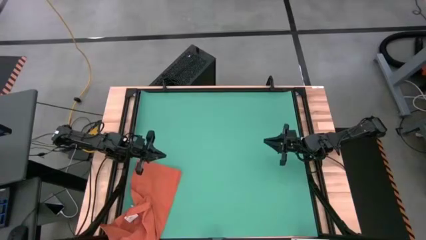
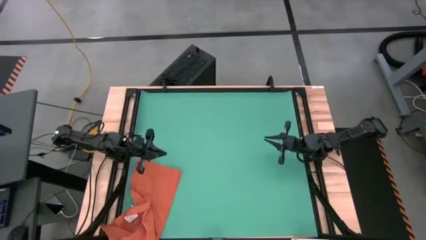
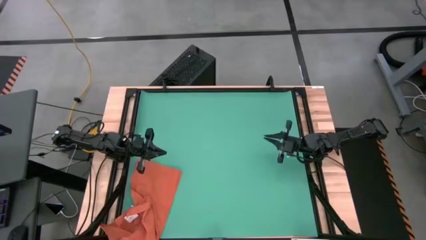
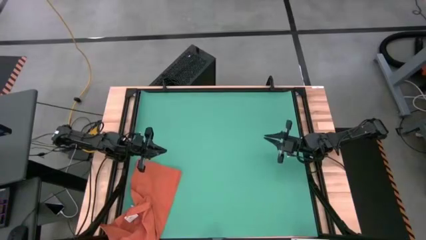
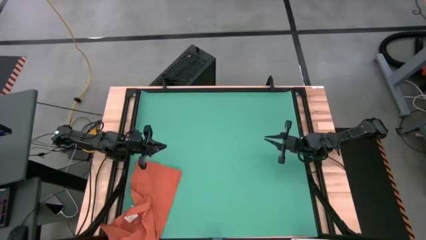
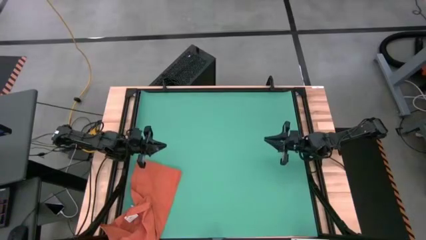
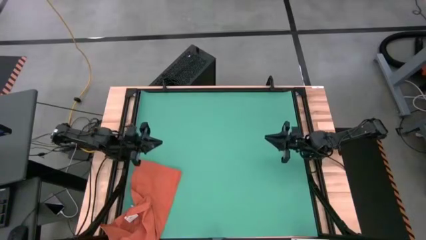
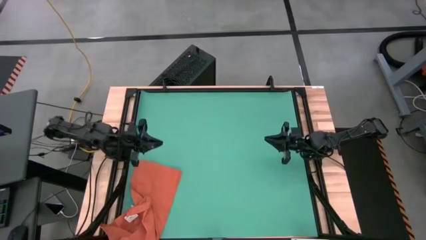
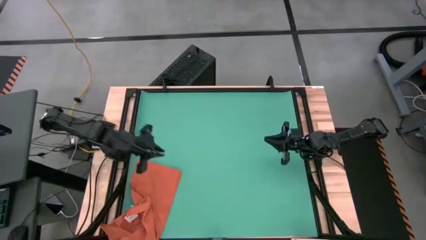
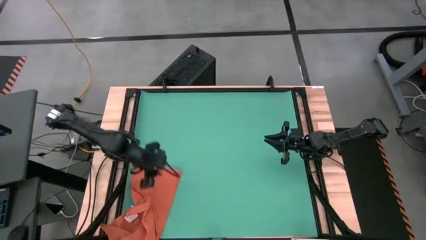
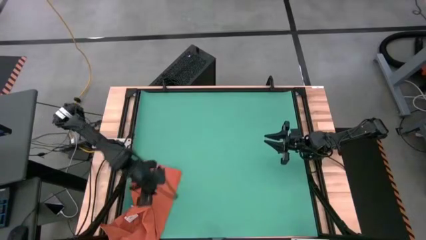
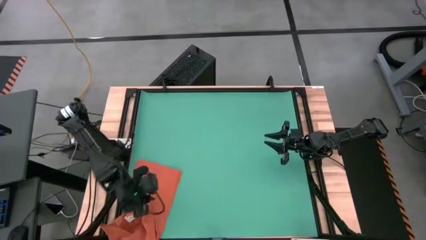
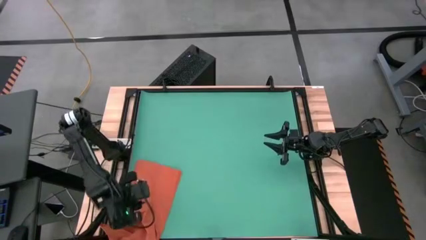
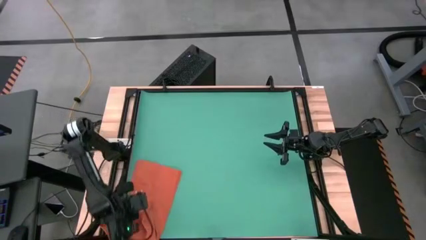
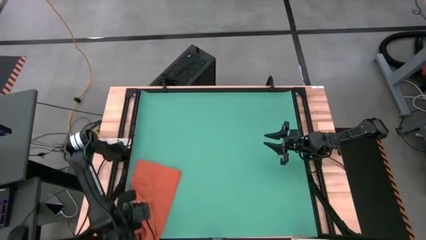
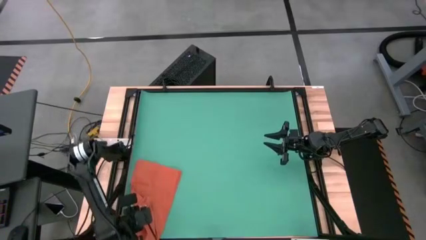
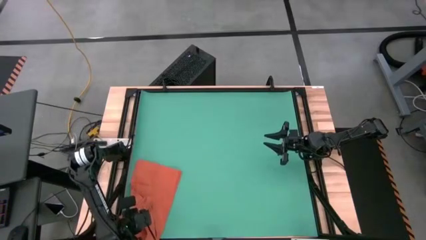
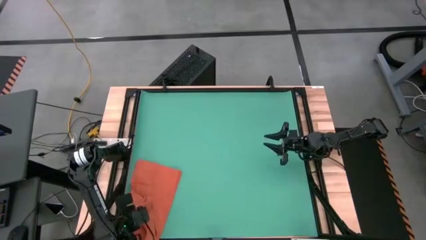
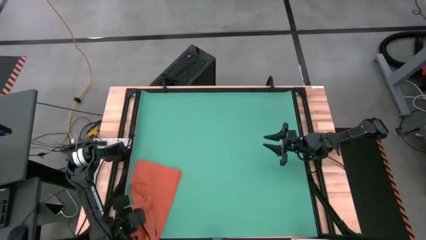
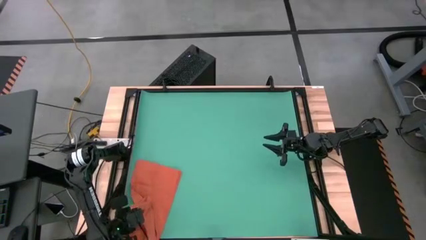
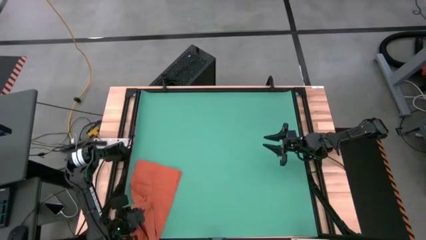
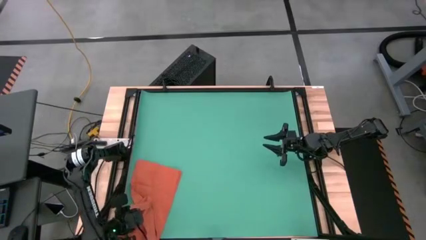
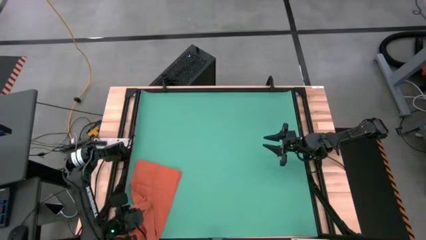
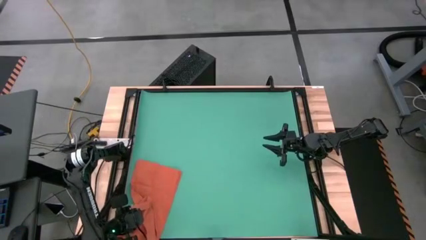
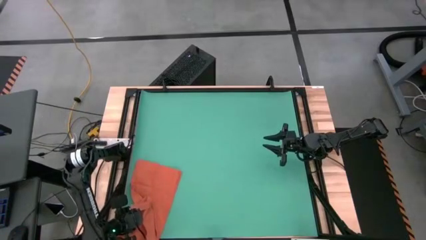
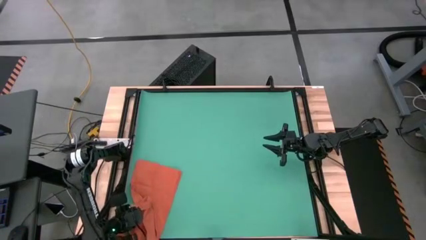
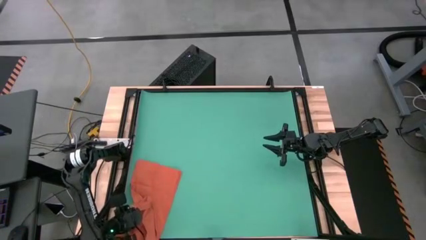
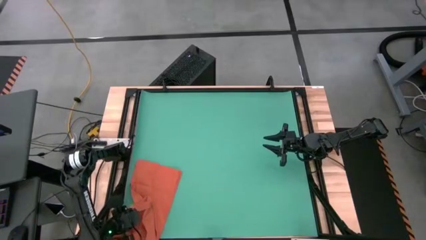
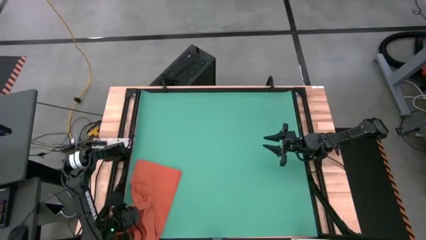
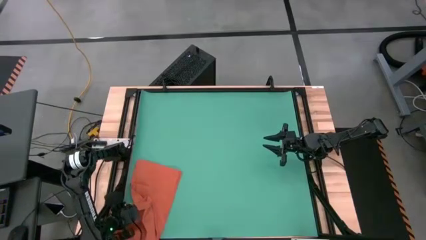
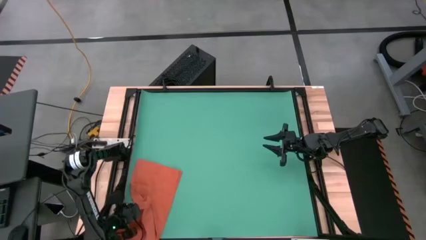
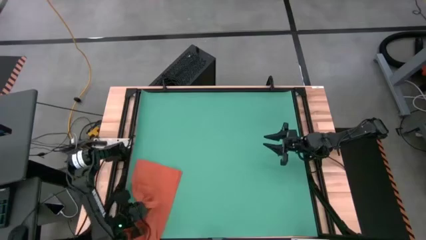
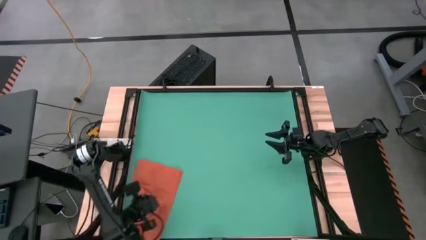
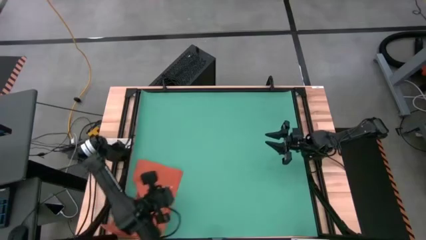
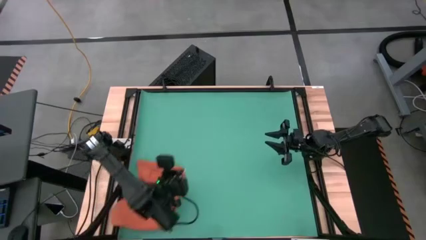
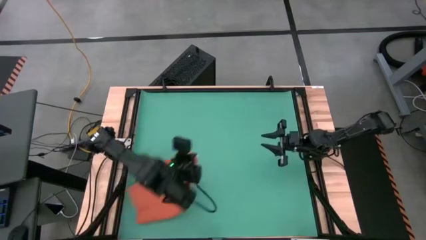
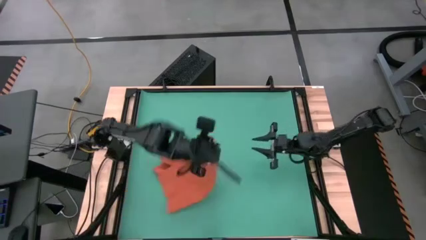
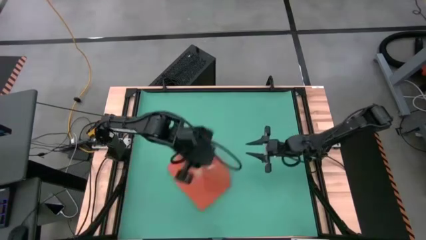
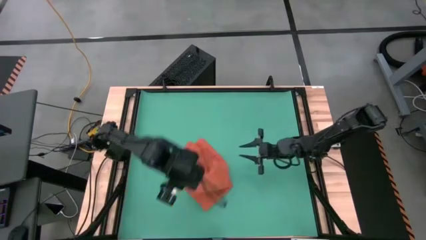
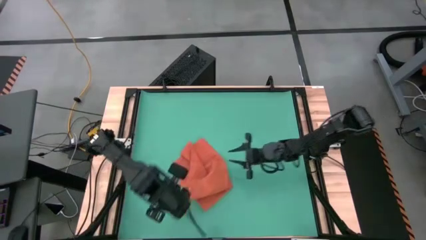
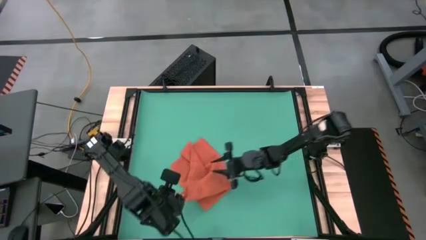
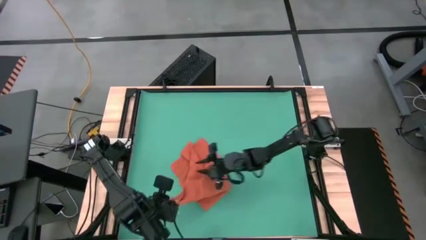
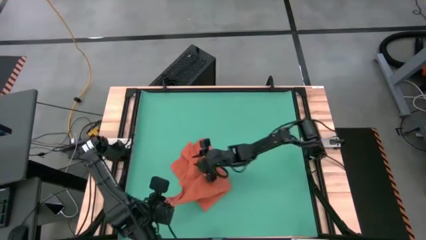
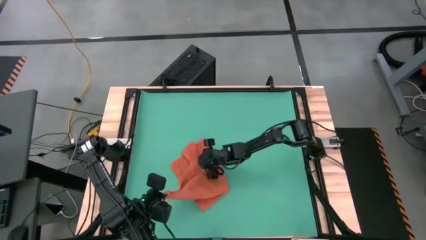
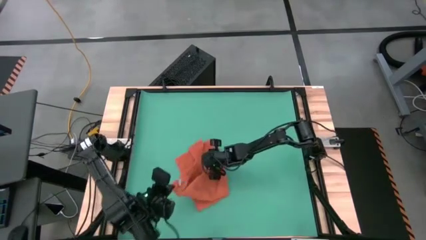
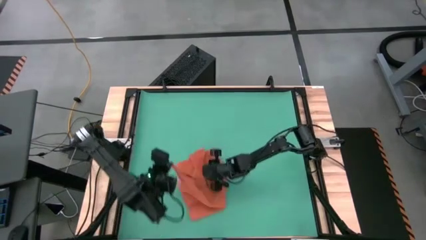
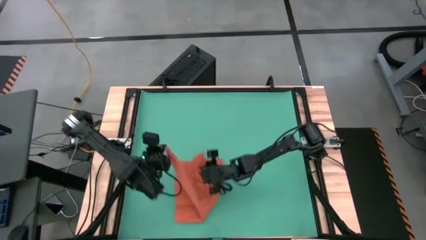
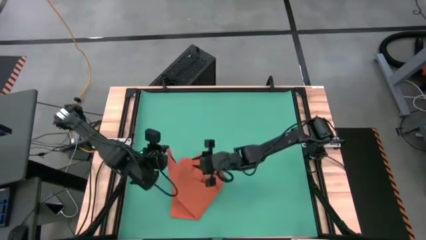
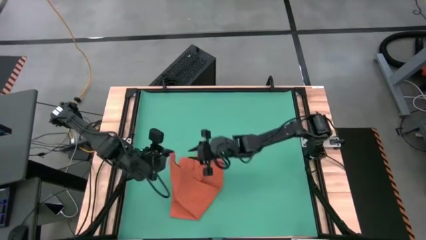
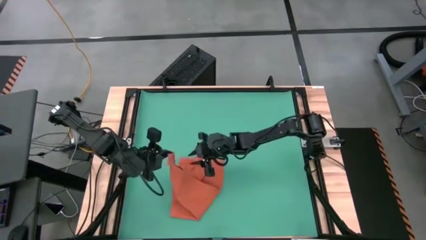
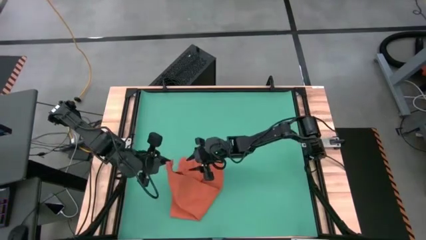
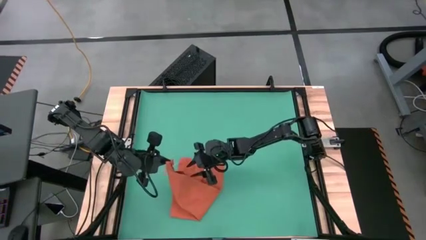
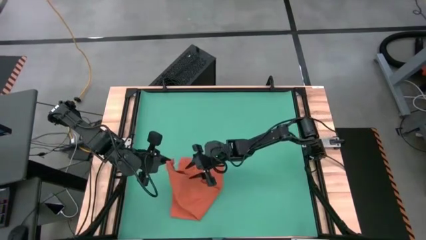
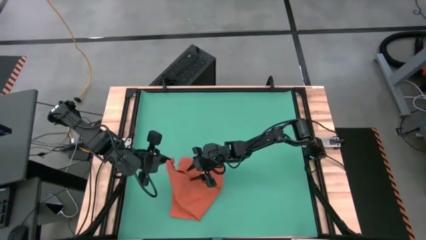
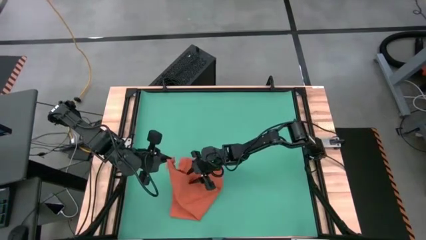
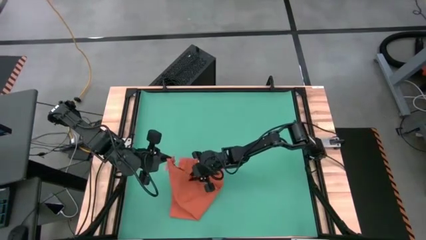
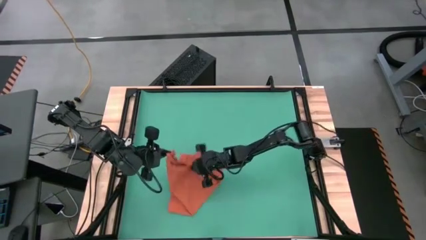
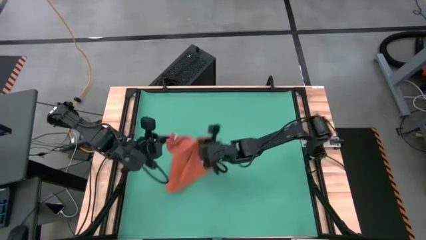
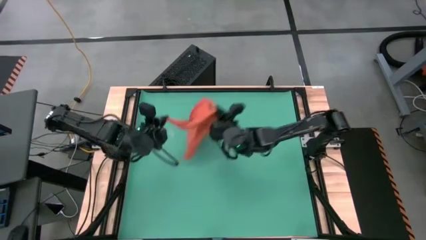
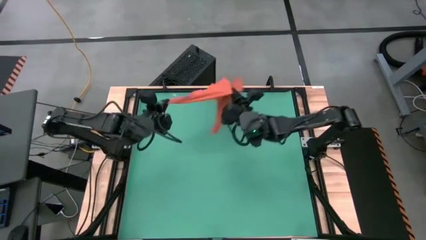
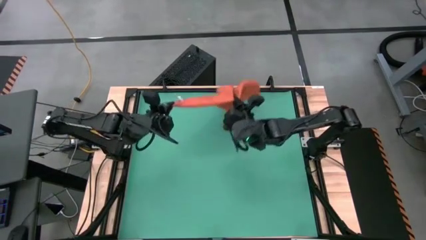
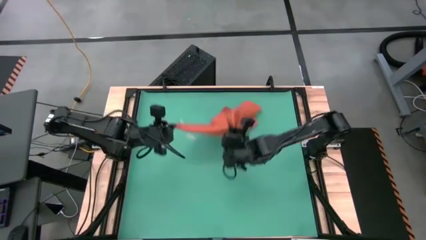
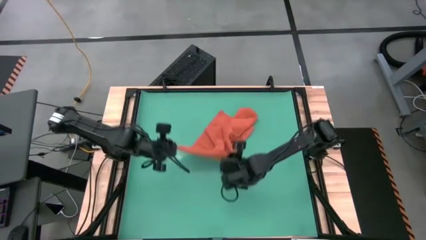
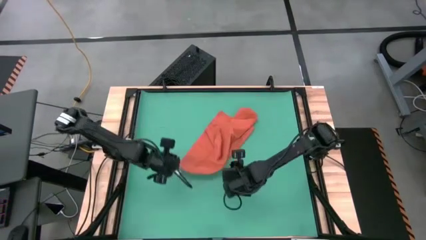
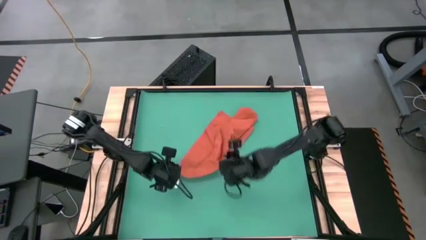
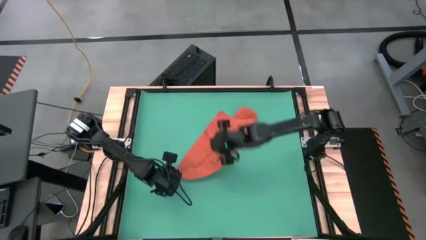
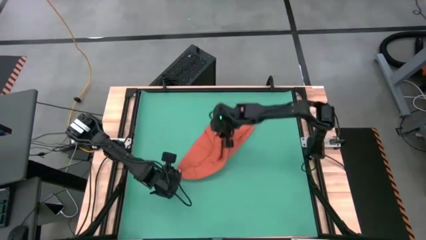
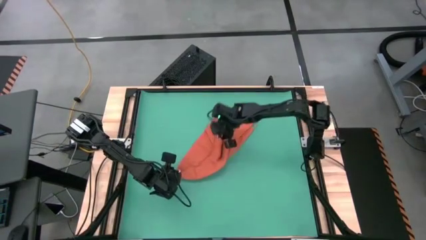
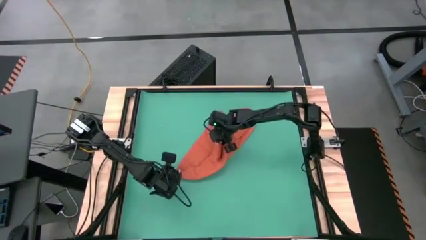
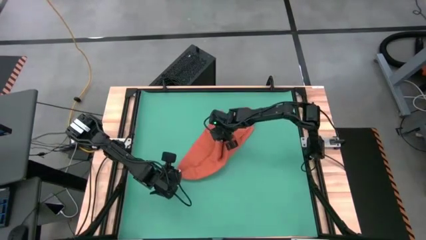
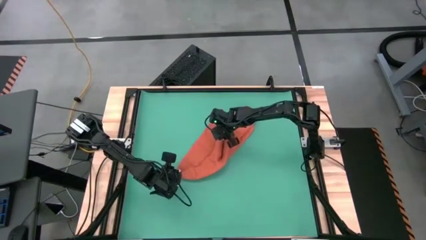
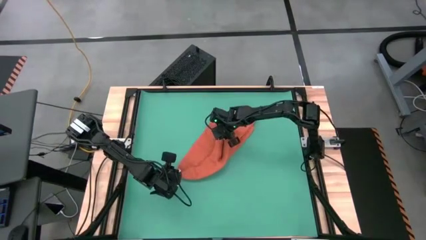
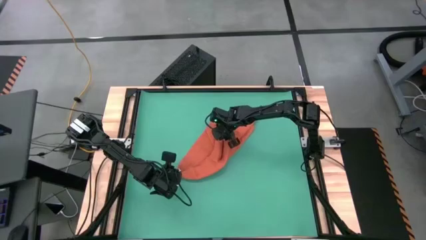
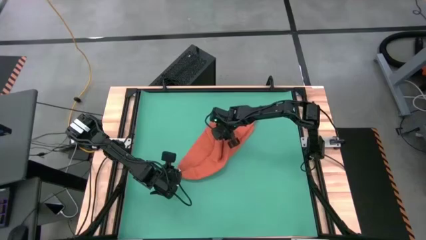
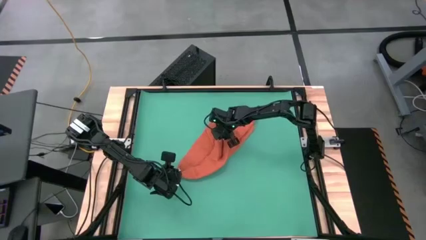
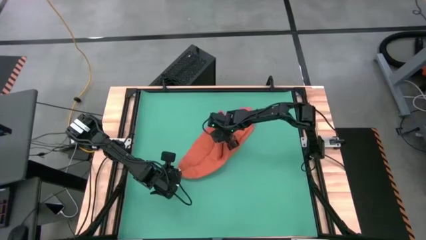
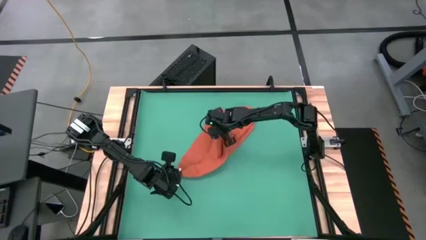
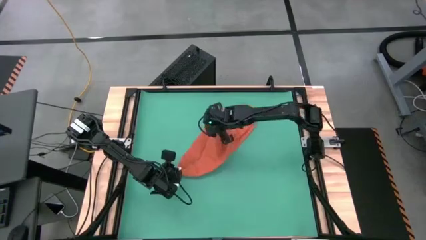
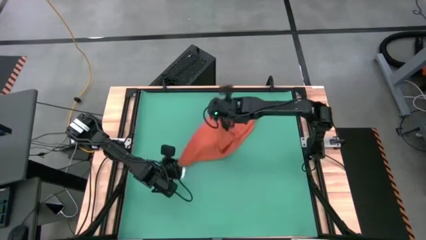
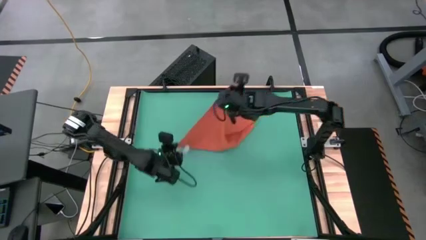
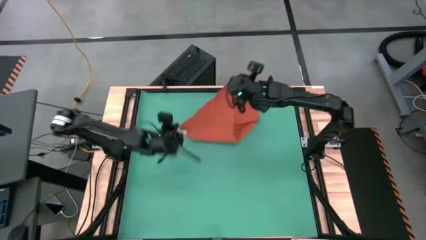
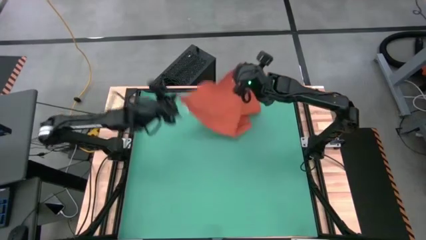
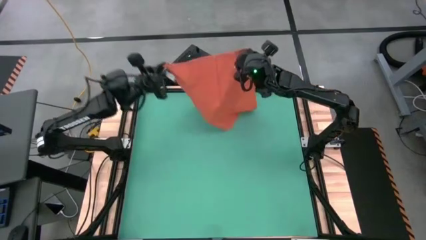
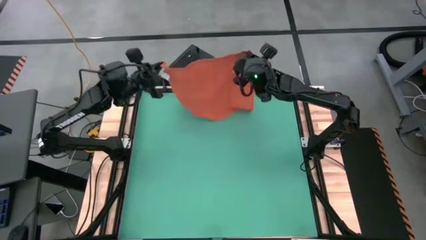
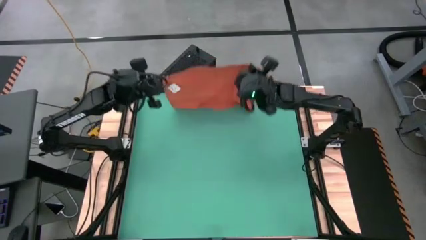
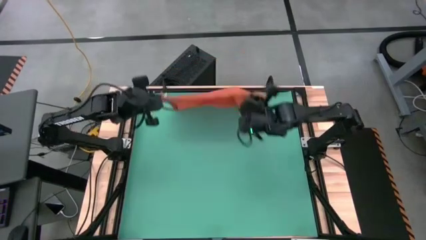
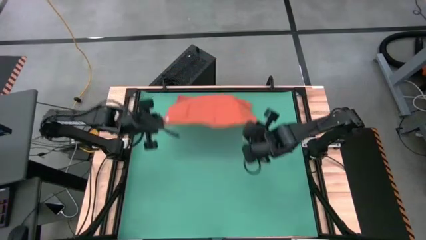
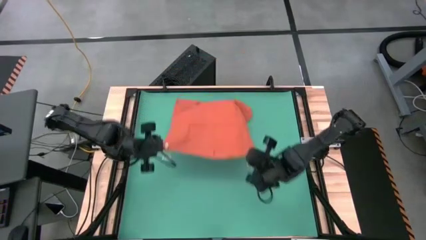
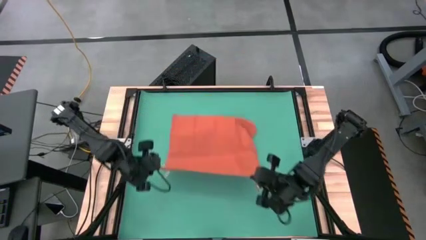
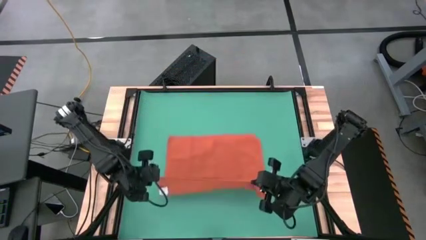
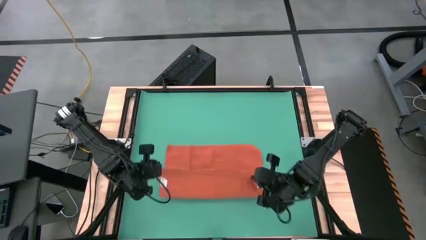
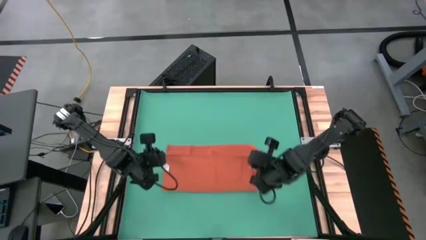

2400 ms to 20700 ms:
Task: Roll towel
Fold the orange towel
